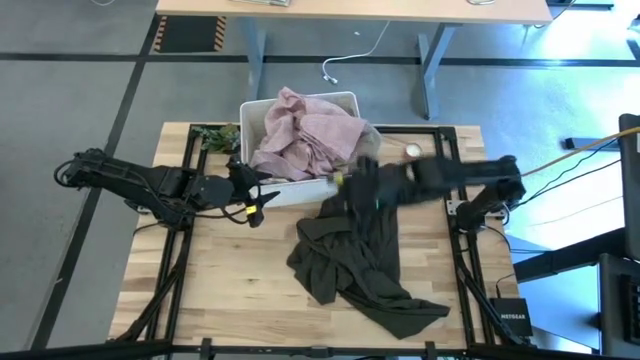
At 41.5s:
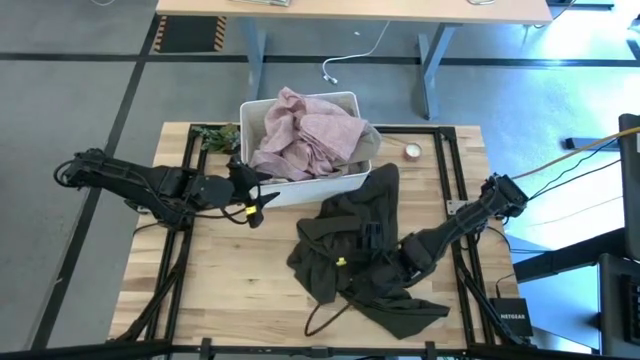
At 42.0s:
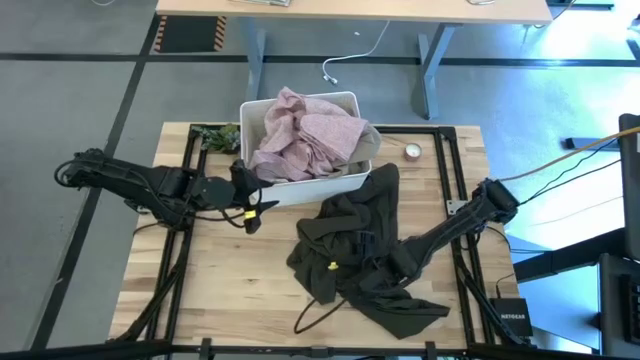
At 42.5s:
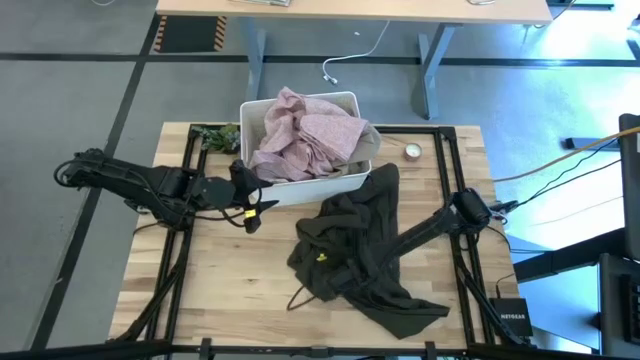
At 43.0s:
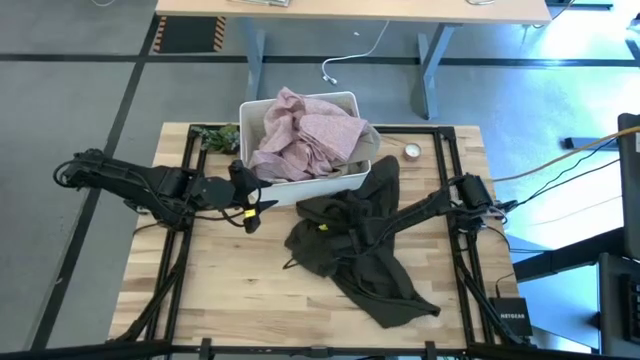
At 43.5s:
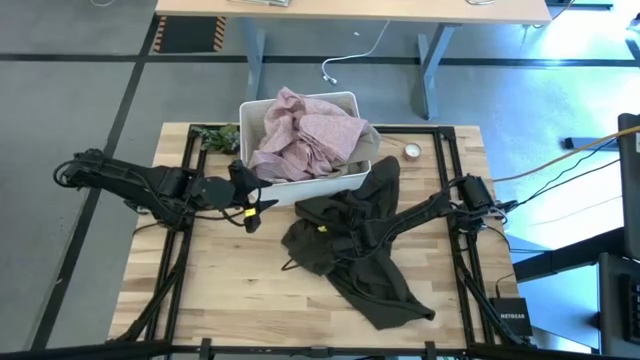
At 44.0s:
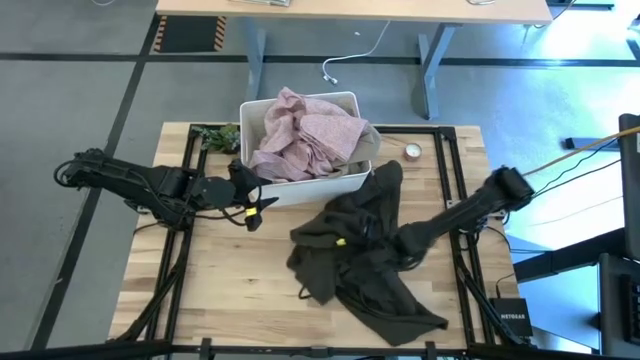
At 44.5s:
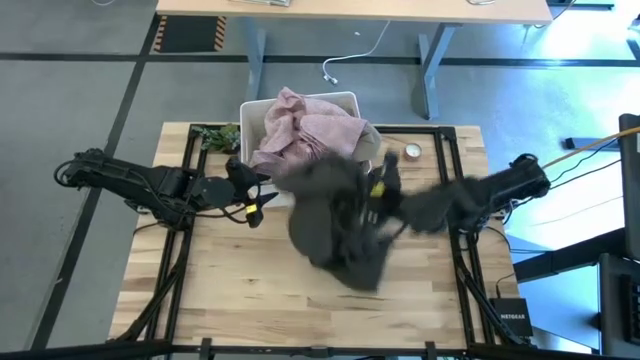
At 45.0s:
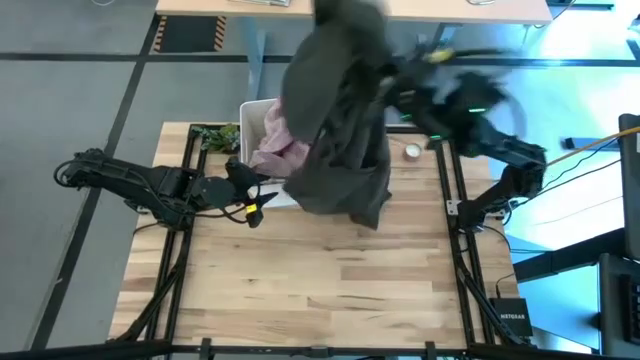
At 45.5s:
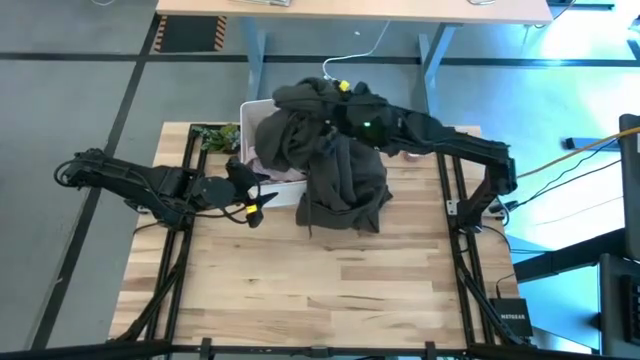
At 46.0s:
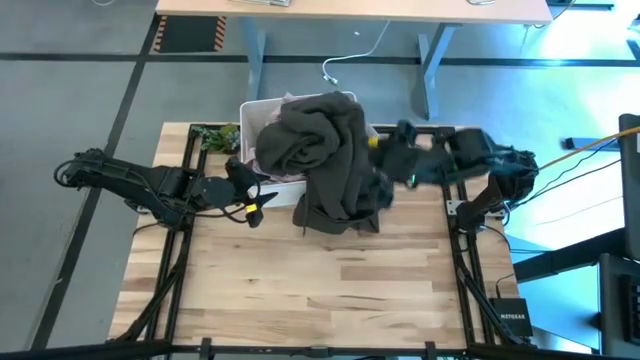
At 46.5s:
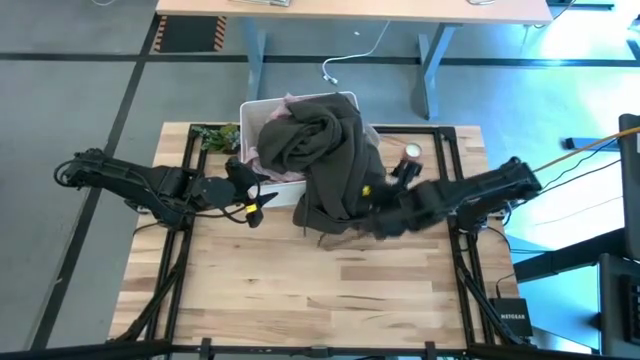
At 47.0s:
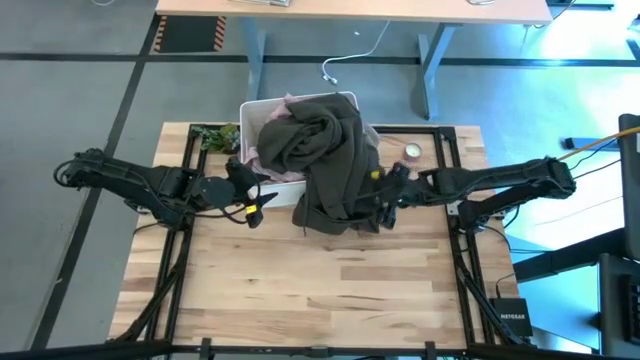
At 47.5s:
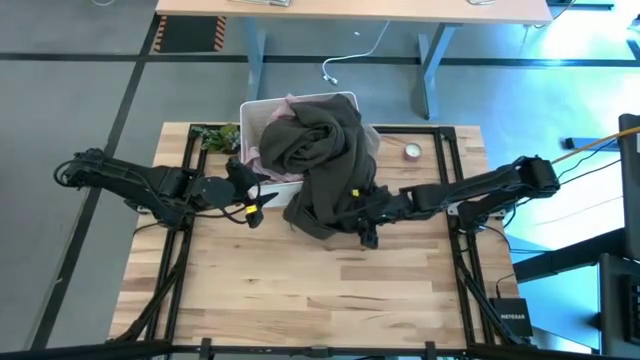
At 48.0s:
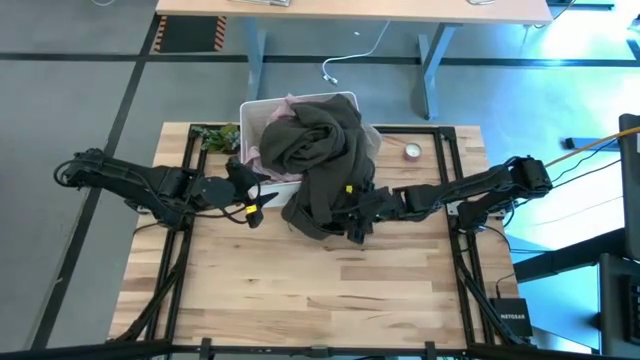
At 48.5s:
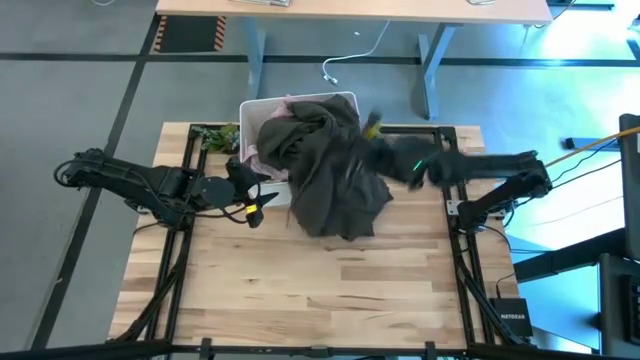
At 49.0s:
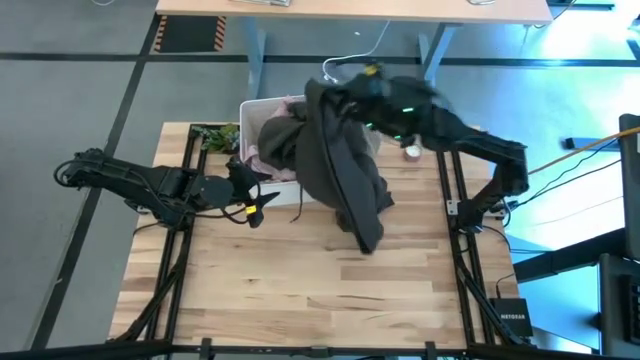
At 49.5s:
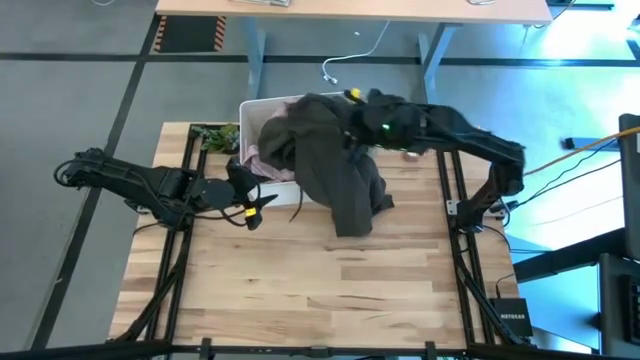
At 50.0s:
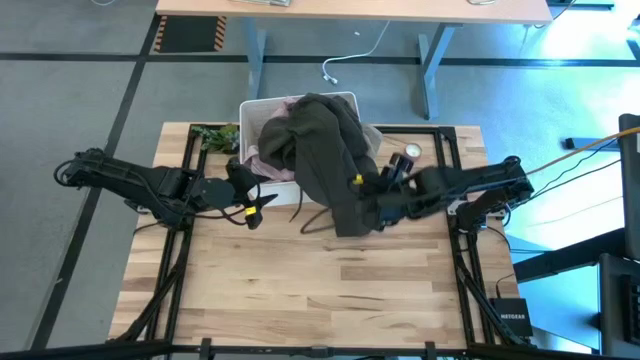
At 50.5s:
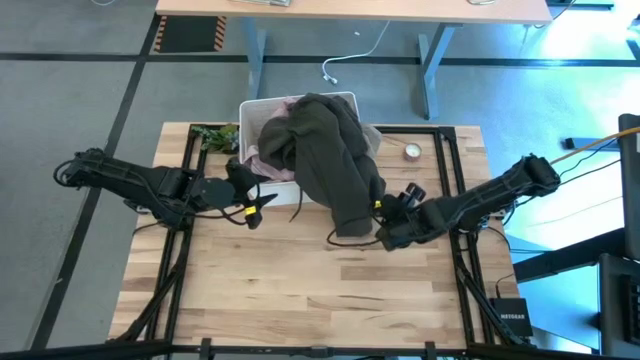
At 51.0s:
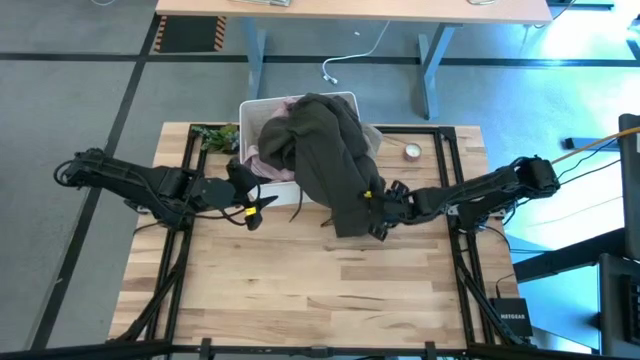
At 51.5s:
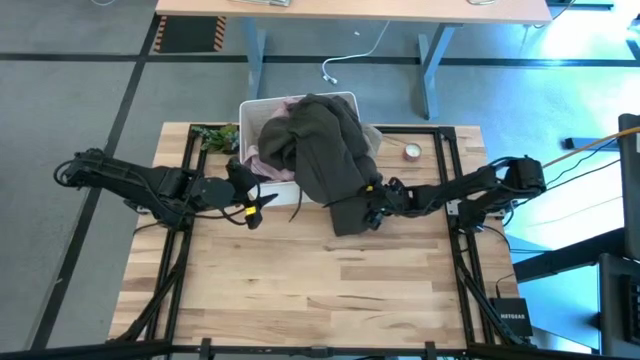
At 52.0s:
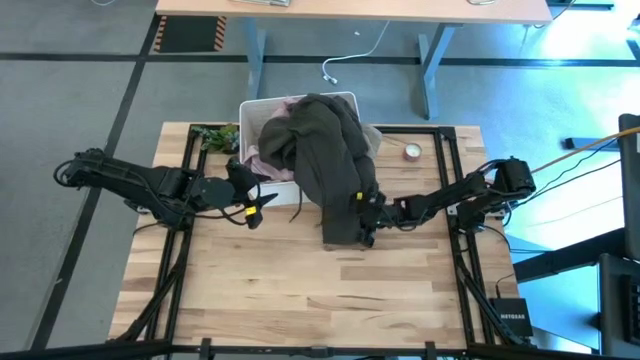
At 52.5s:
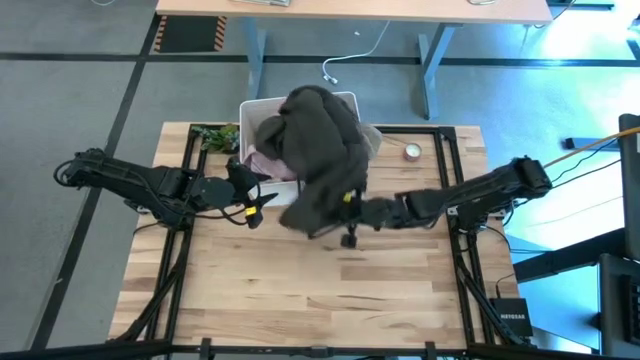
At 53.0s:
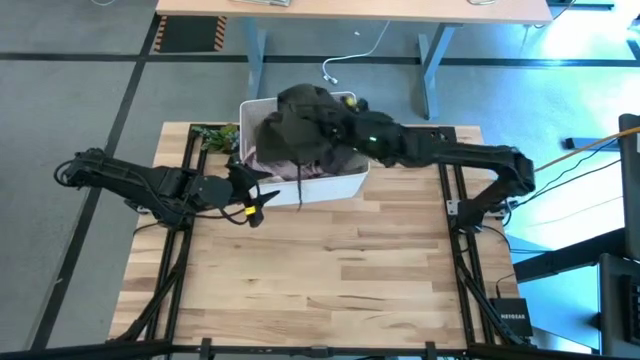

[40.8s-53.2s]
Task: Sort clothes
Put the brown jacket into the white laundry bin

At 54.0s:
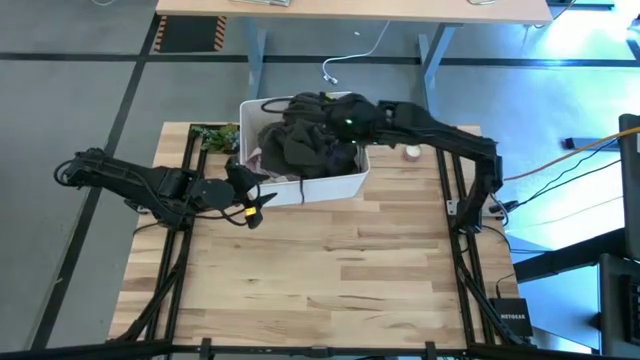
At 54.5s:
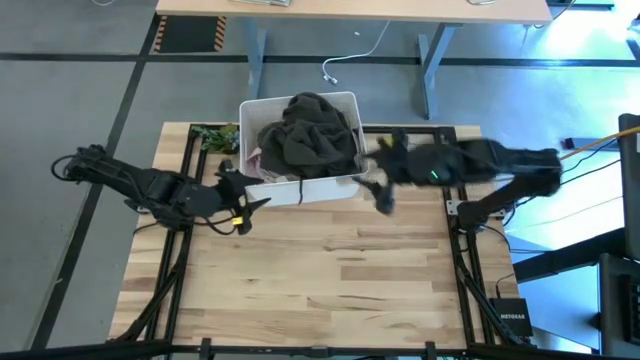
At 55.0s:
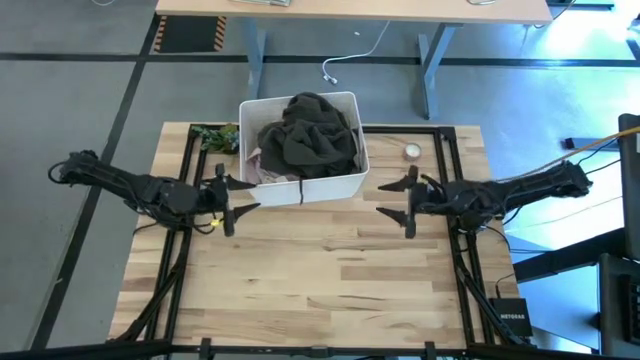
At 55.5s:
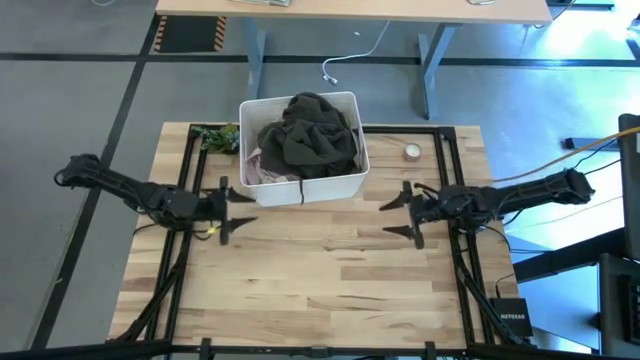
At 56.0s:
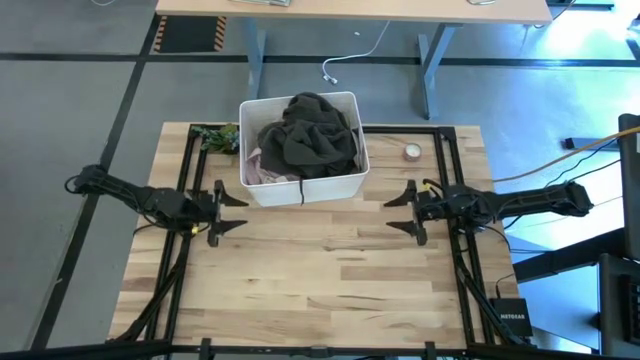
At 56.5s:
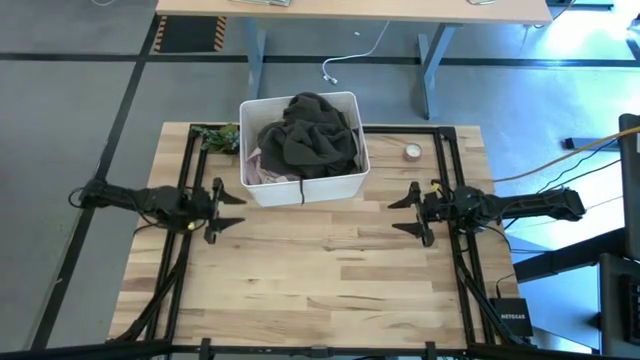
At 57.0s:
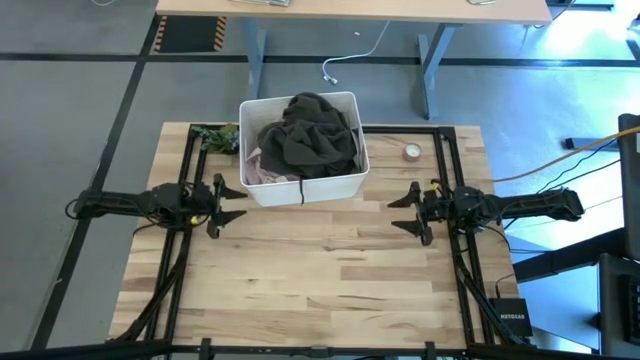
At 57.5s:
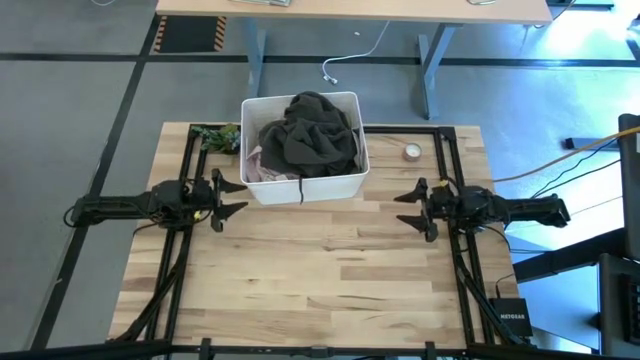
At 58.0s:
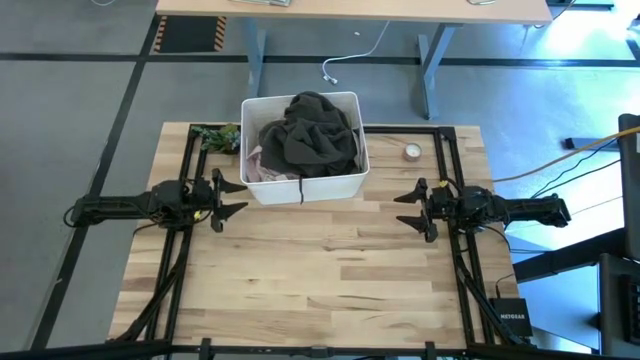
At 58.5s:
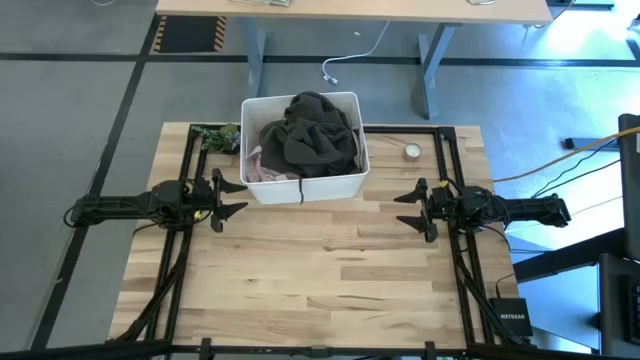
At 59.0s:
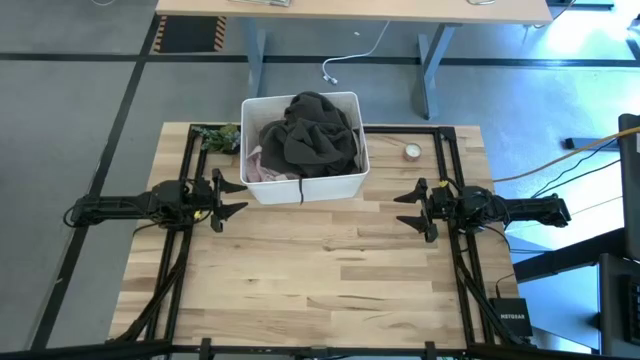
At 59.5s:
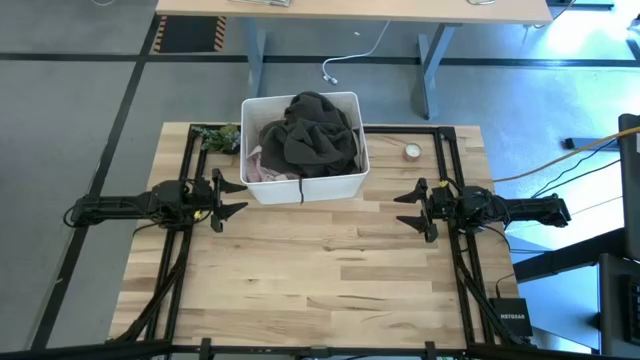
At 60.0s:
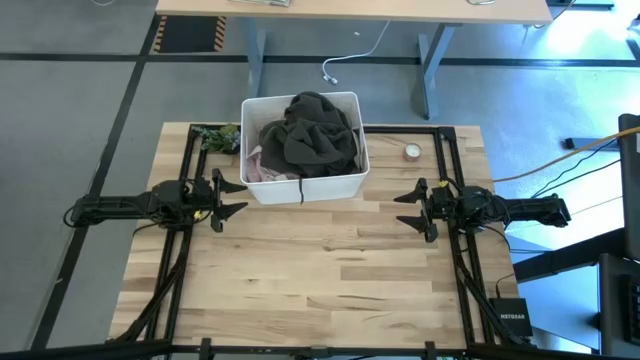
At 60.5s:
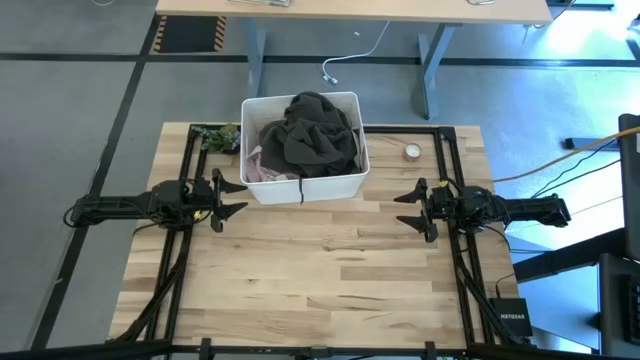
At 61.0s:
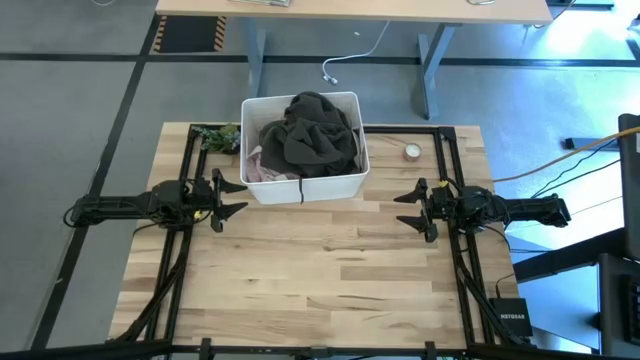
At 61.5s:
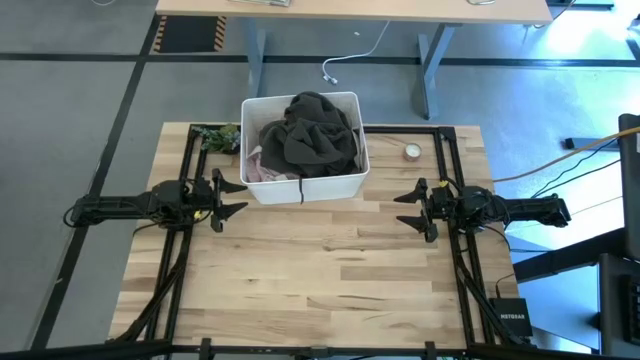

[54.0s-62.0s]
Return to Home Position
